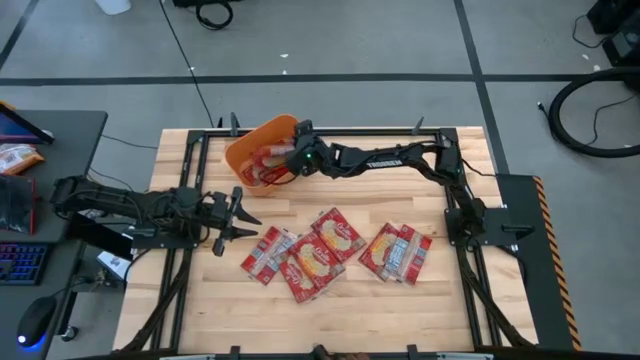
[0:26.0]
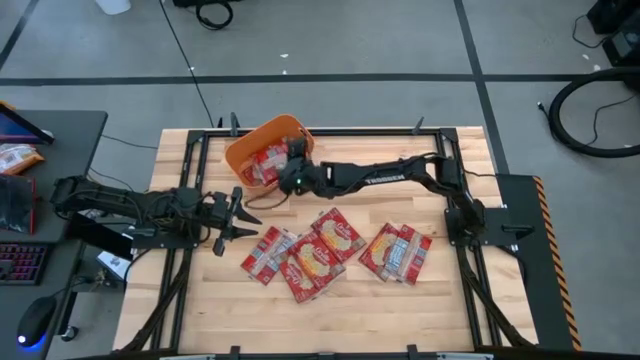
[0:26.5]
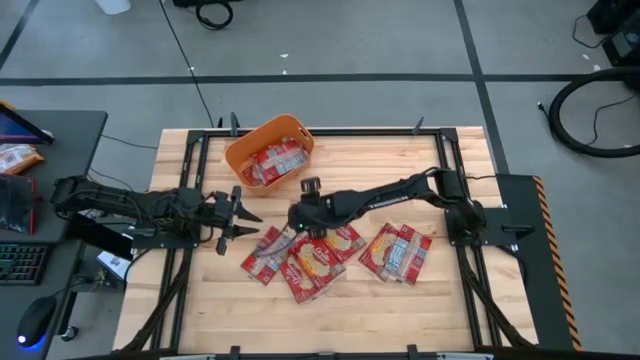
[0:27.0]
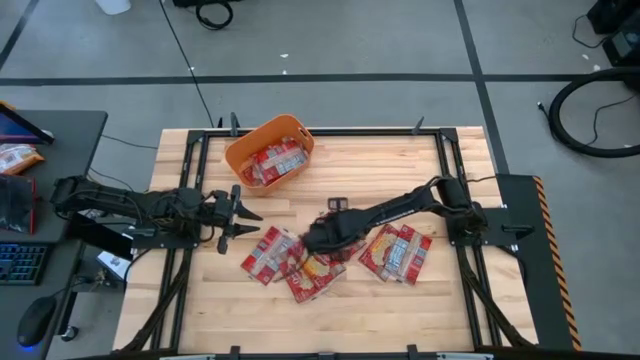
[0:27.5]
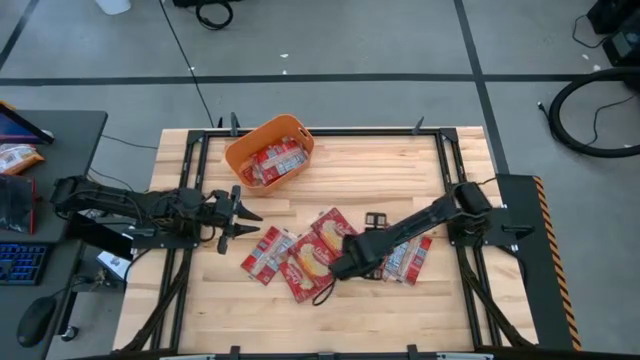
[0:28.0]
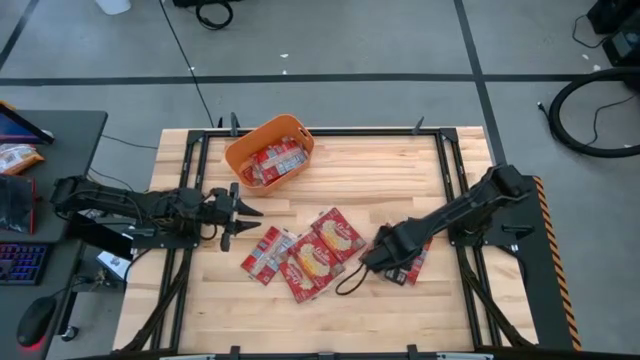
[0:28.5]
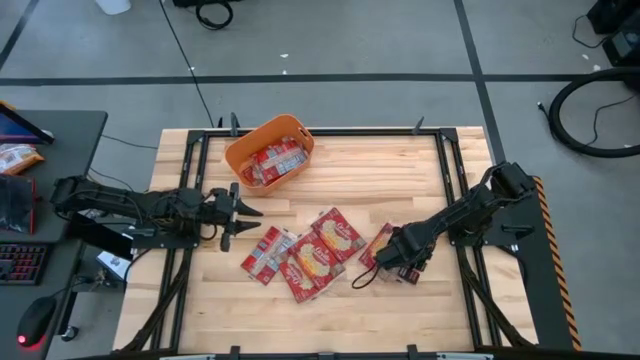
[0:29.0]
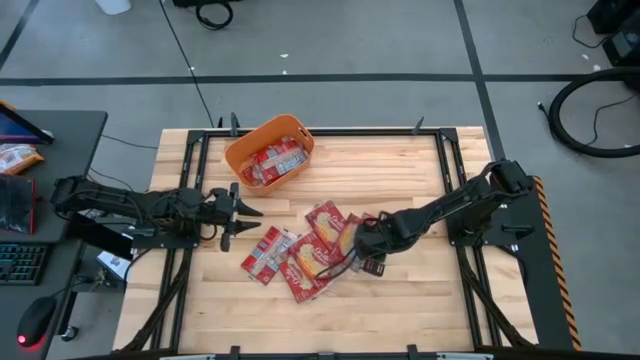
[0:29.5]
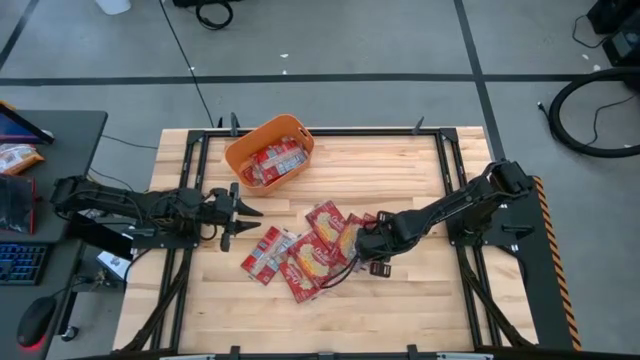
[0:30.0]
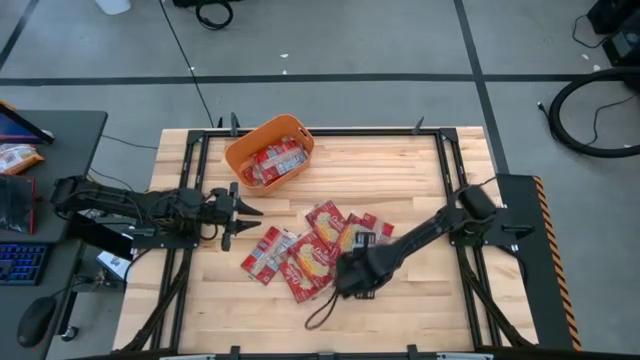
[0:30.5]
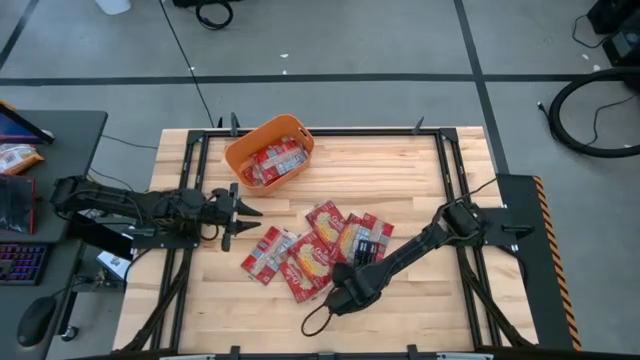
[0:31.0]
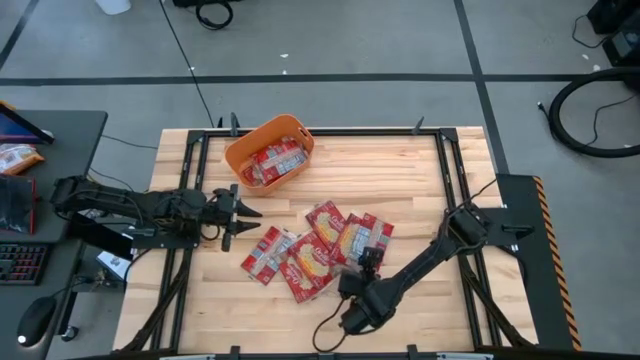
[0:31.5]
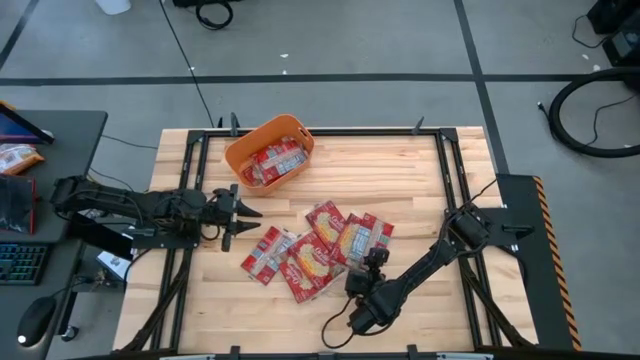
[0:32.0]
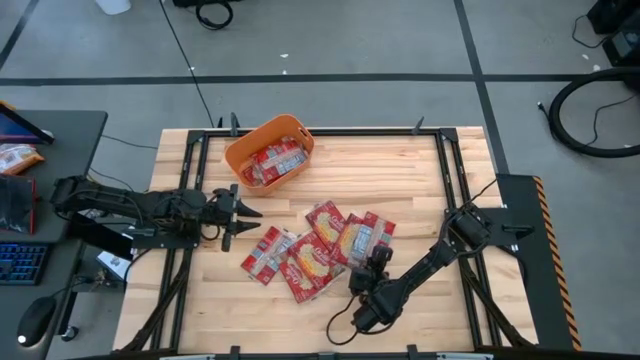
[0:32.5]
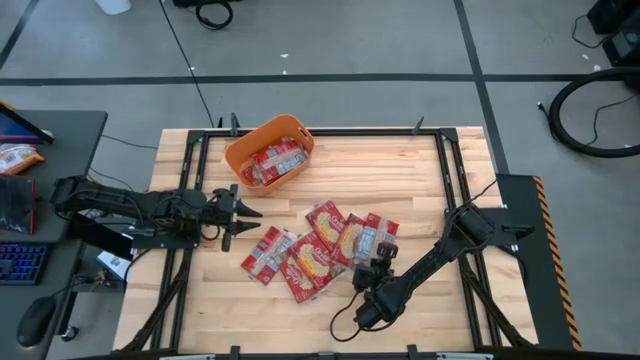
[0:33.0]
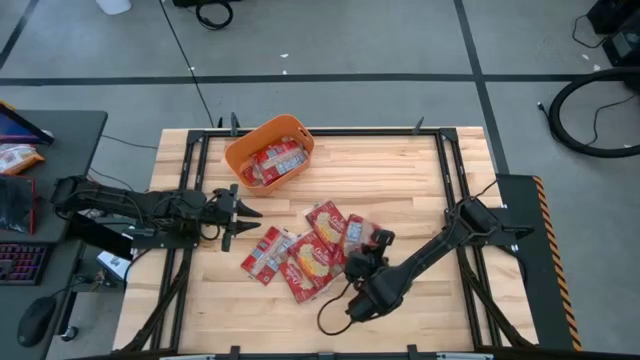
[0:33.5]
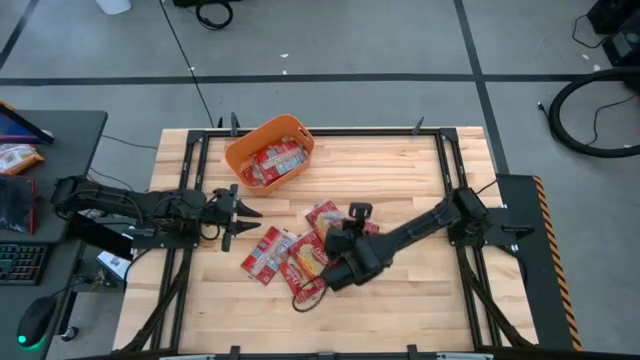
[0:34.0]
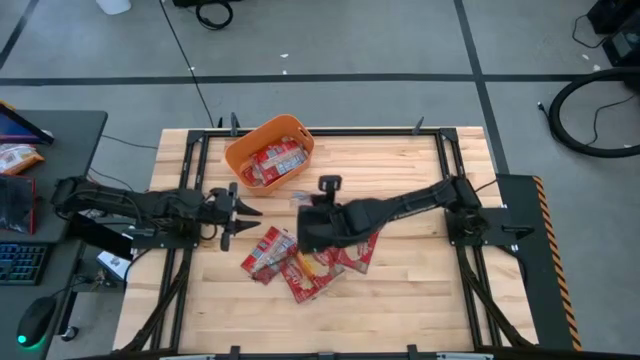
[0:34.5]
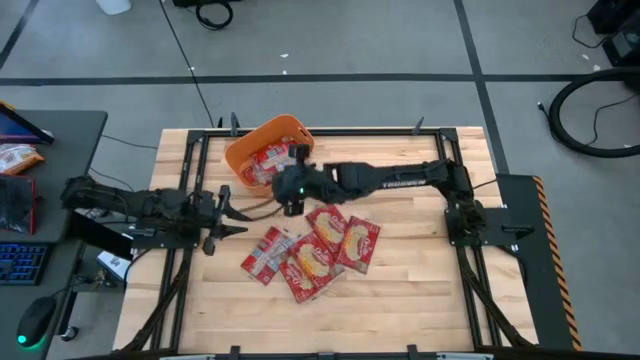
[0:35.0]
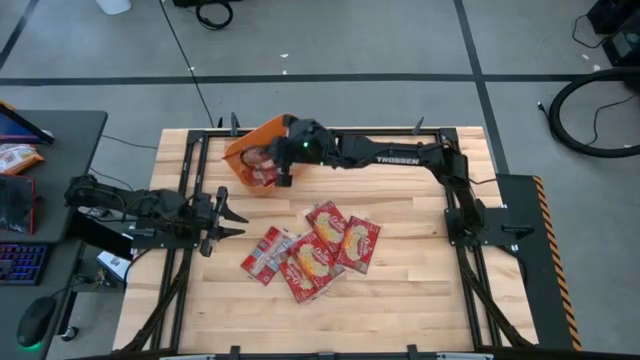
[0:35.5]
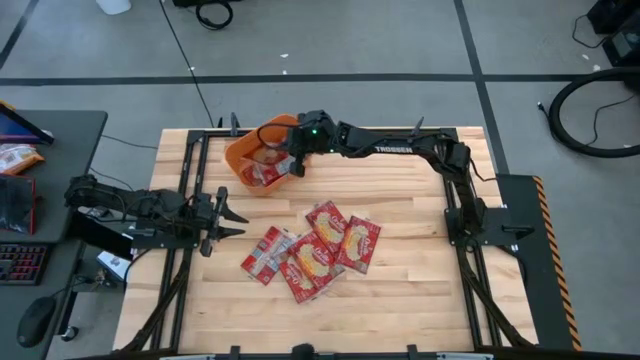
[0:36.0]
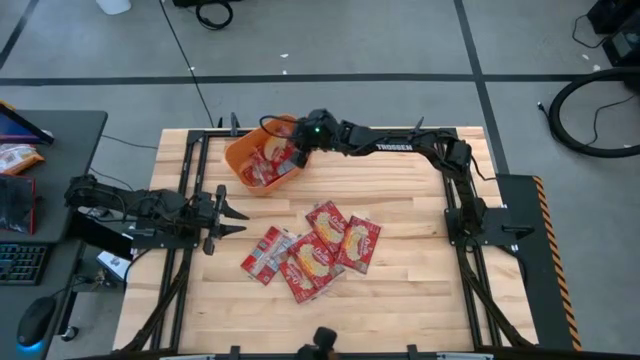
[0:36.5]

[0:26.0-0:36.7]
Task: Sort popcorn bags into baskets
Put the red popcorn bag into the orange bin

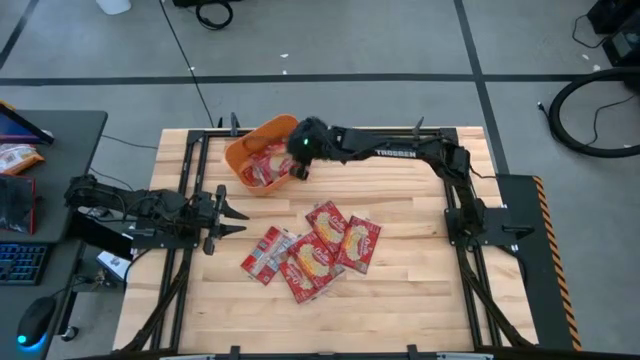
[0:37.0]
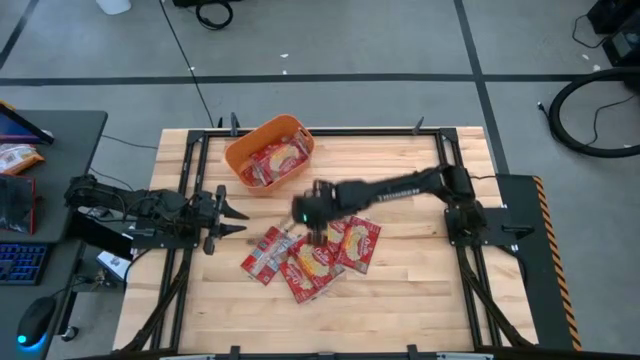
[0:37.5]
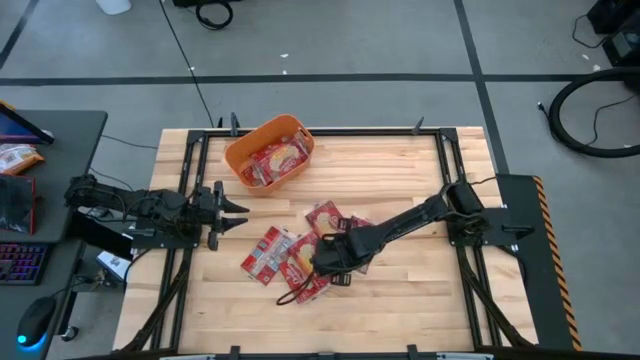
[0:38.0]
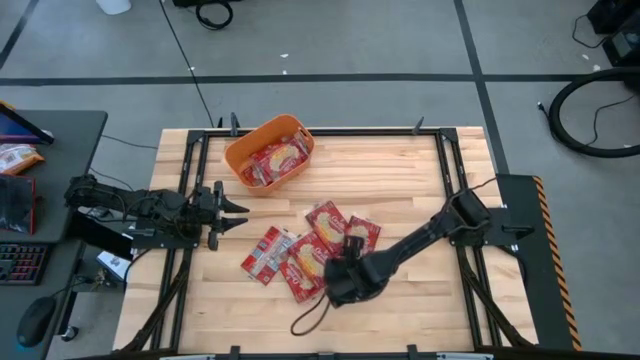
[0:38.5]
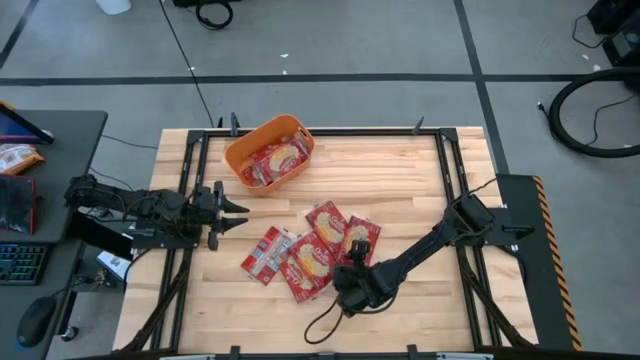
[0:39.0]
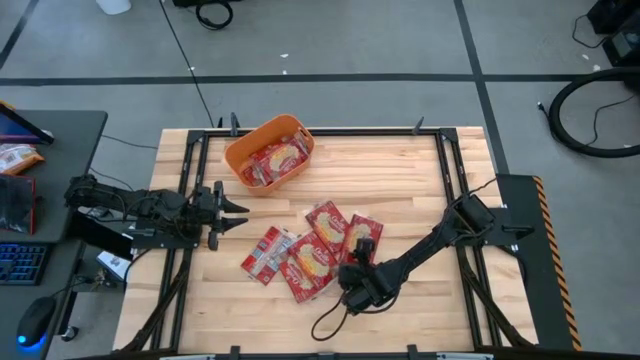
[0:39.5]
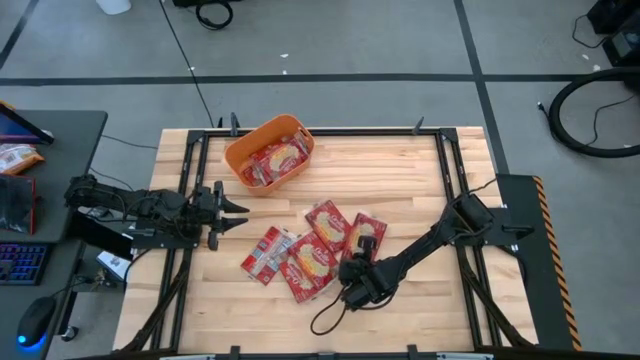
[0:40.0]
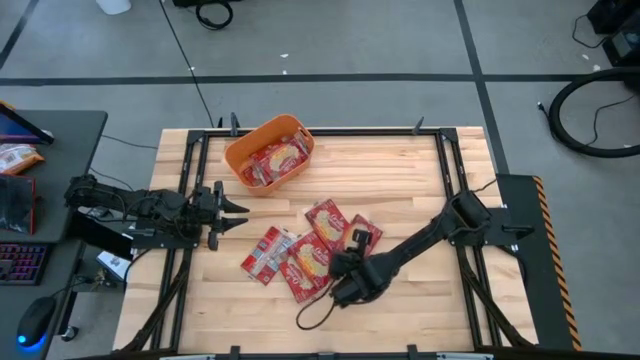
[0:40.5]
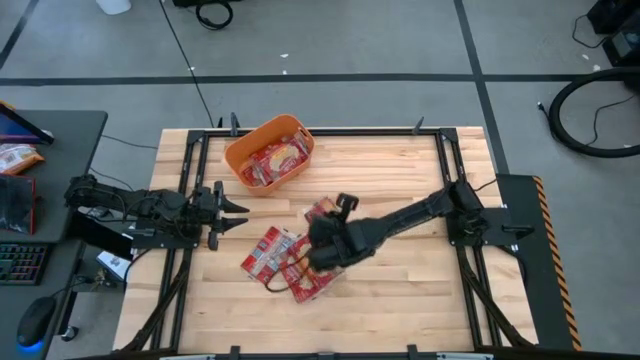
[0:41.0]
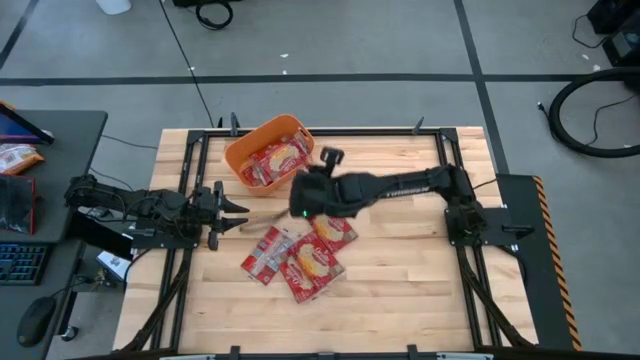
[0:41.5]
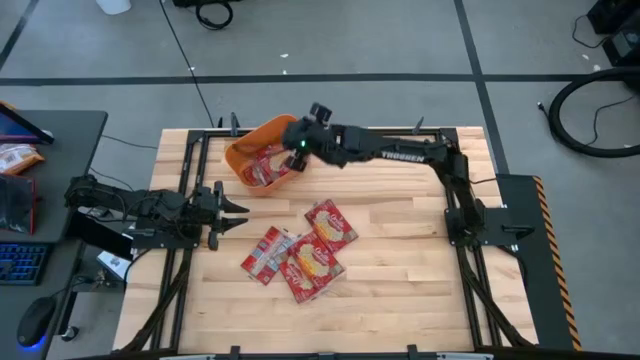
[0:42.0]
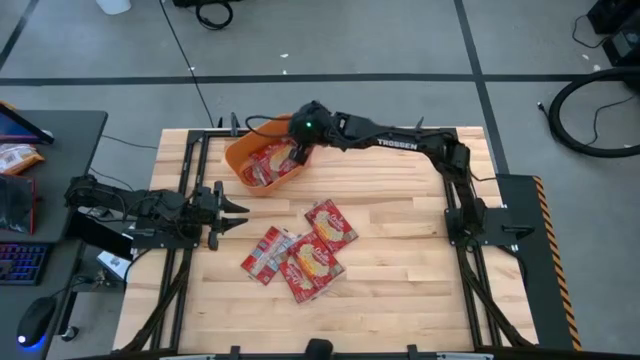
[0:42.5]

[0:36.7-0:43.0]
Put the red popcorn bag into the orange bin

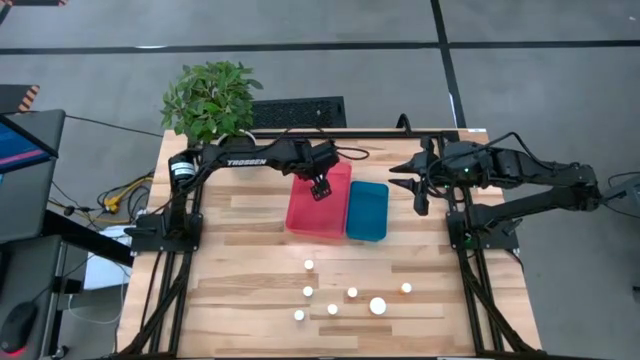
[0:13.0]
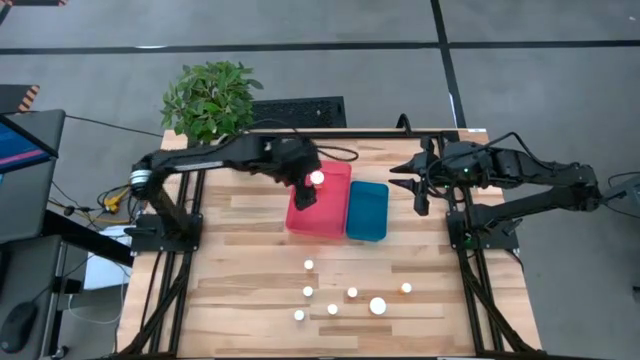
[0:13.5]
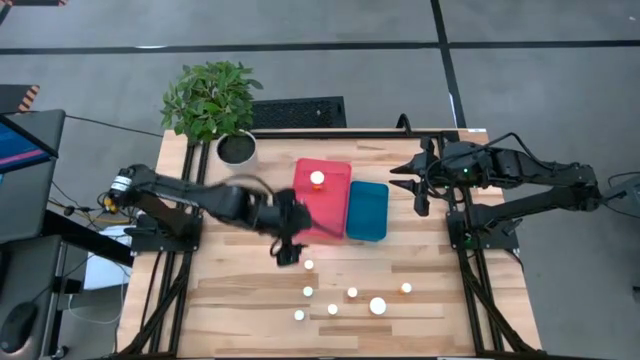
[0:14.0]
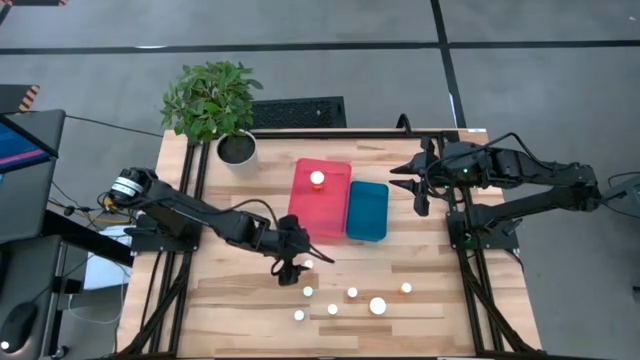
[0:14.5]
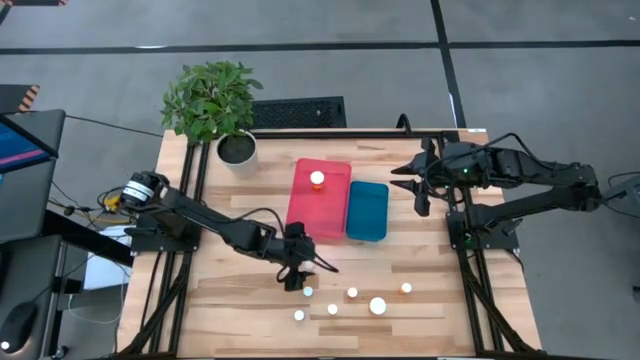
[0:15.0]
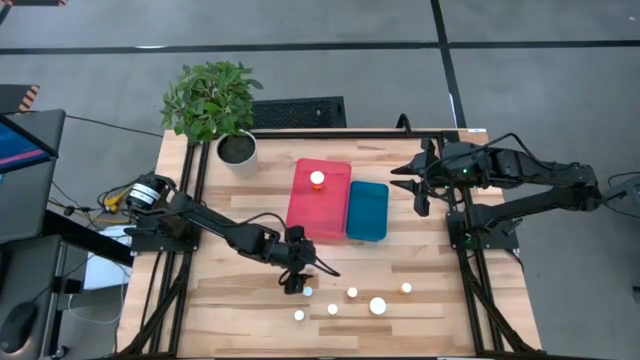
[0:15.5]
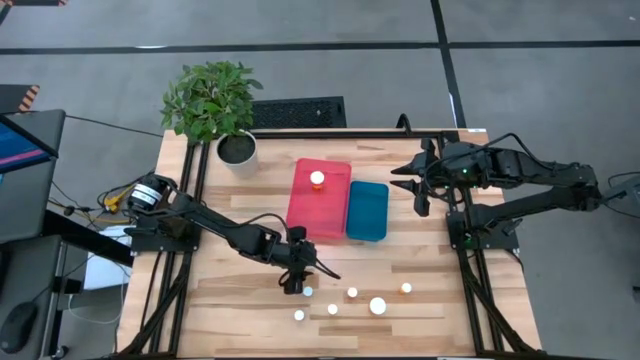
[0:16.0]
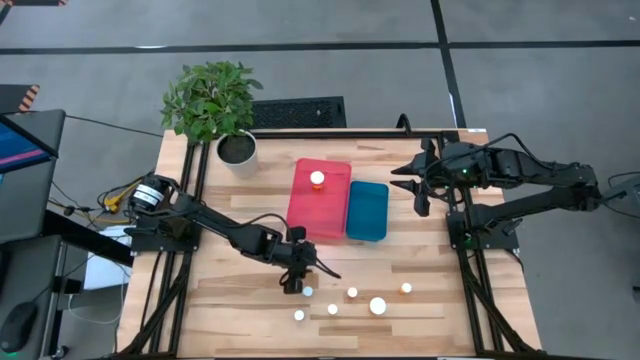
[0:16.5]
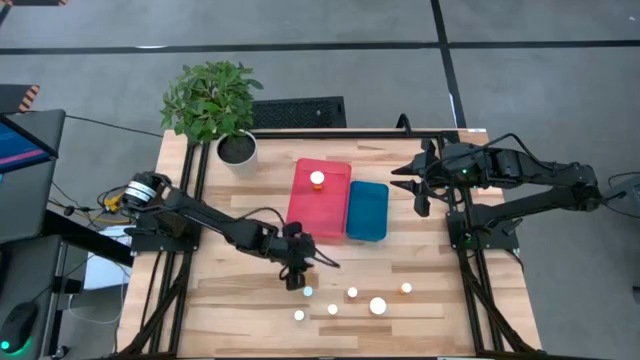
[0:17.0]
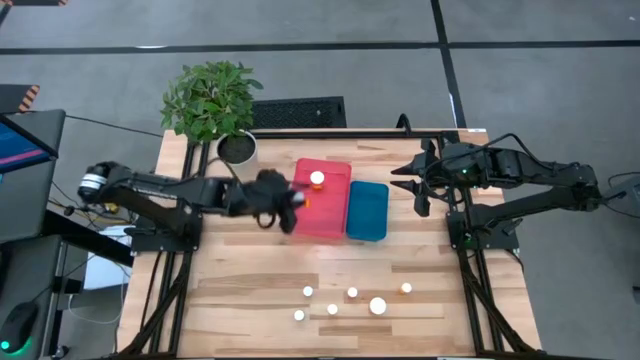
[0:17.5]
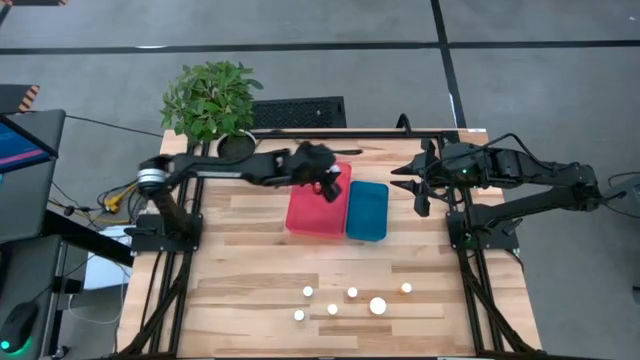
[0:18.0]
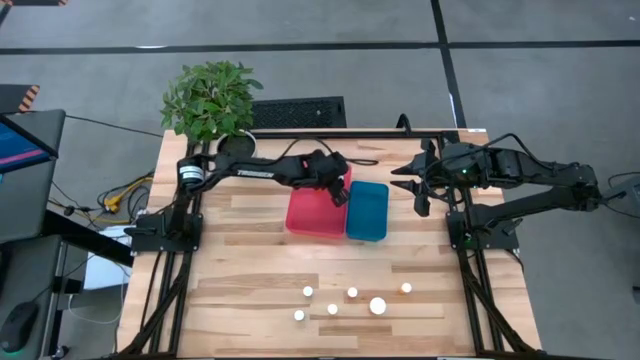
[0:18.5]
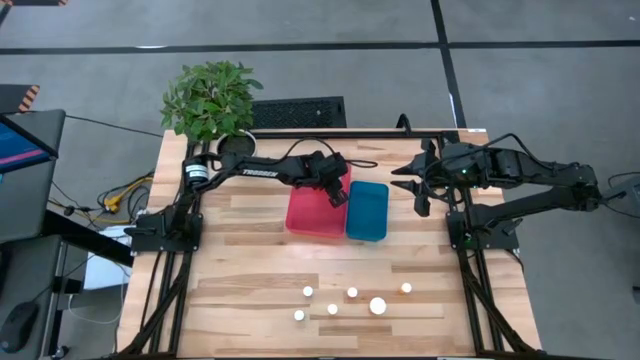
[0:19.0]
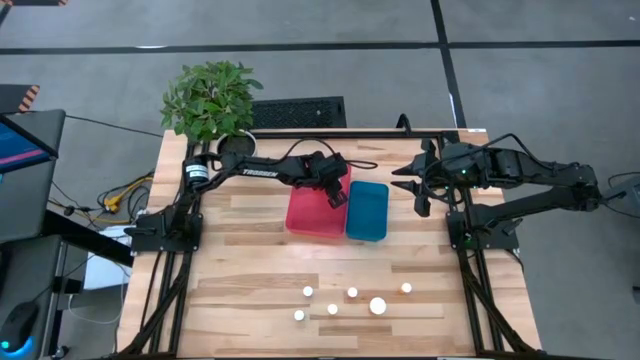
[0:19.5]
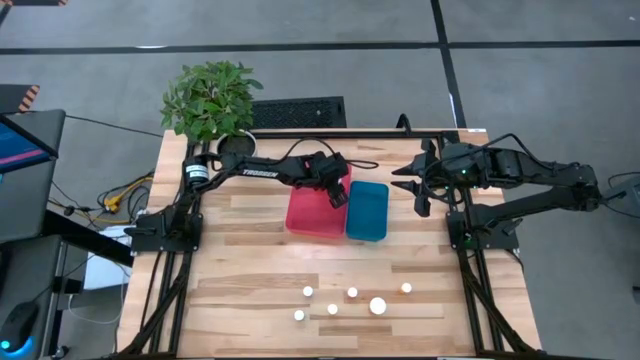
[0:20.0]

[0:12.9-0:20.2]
Task: Pick and place medicine bottles into bin by pill shape (circle, oval)
Put the small orange pill bottle into the red bin
